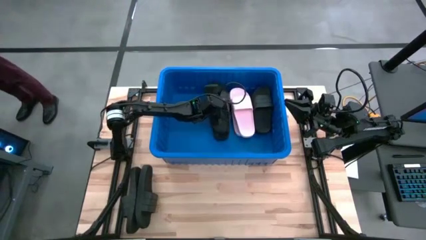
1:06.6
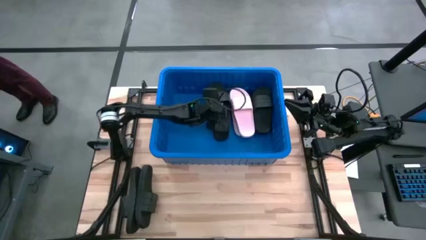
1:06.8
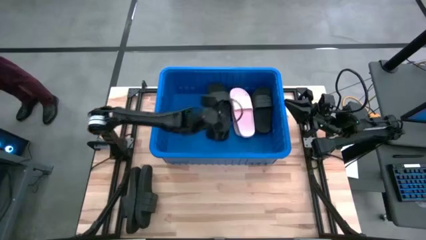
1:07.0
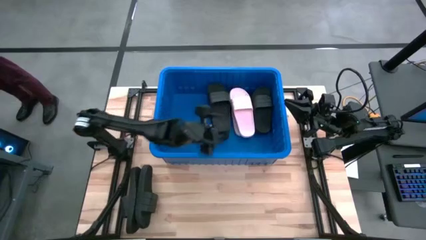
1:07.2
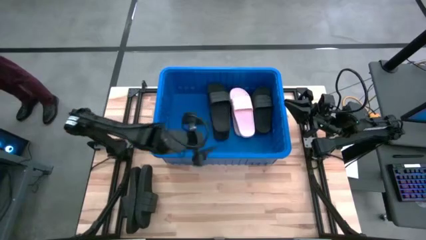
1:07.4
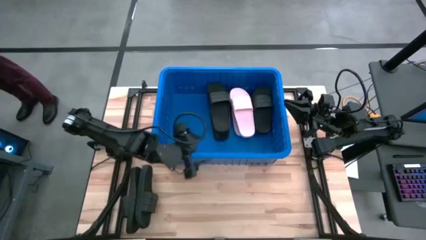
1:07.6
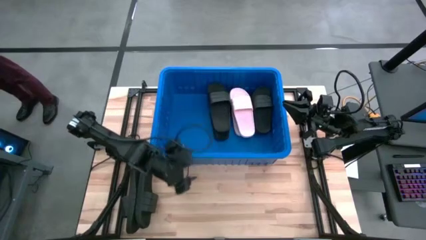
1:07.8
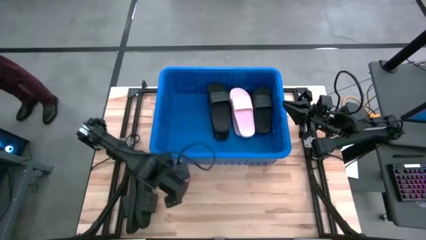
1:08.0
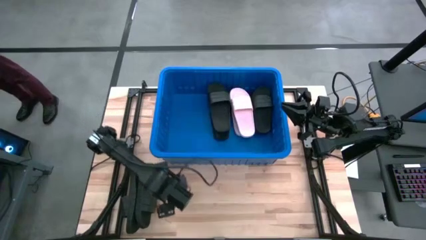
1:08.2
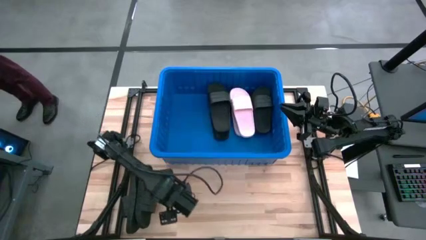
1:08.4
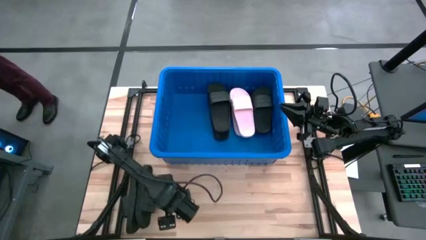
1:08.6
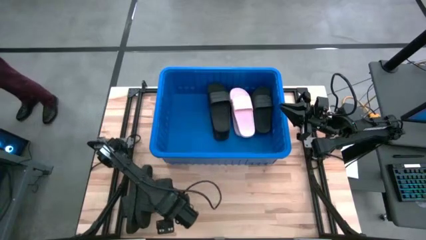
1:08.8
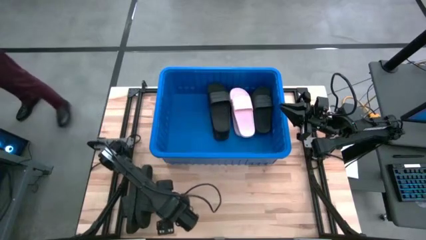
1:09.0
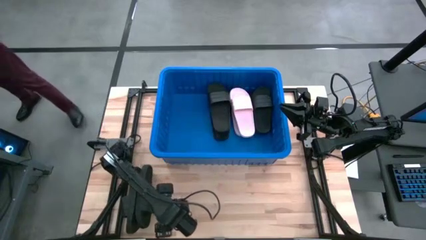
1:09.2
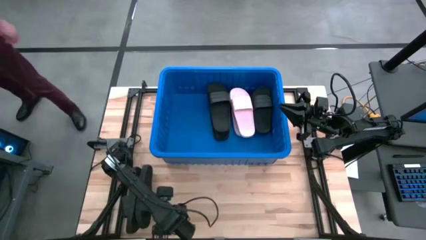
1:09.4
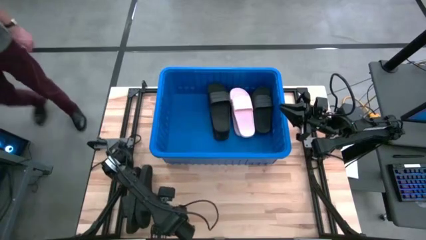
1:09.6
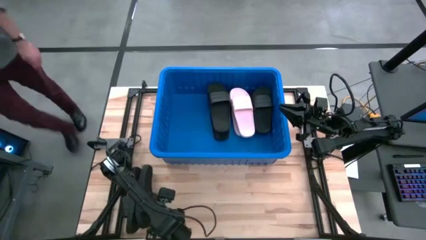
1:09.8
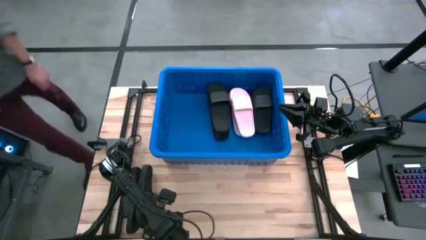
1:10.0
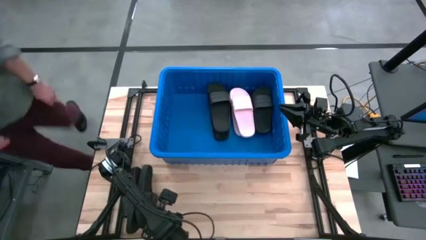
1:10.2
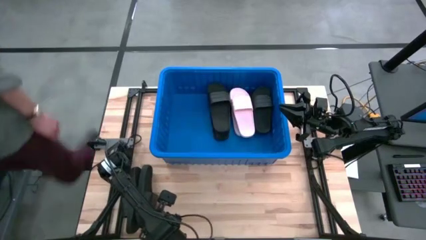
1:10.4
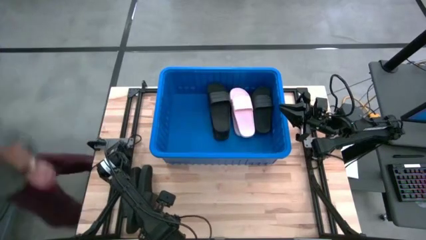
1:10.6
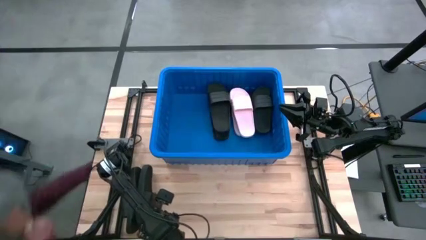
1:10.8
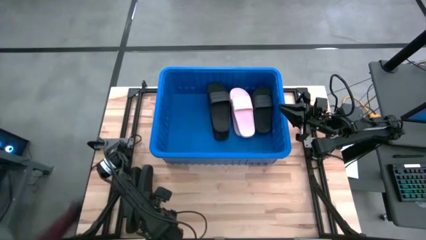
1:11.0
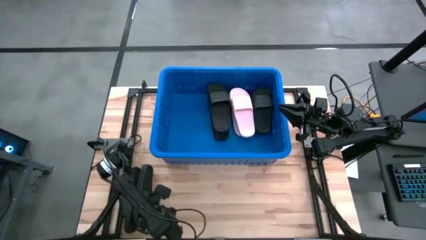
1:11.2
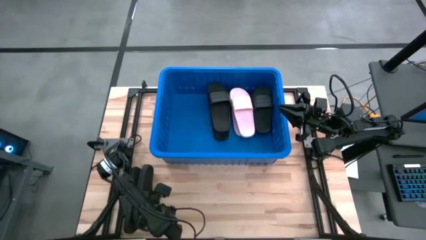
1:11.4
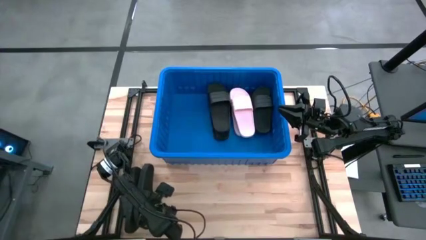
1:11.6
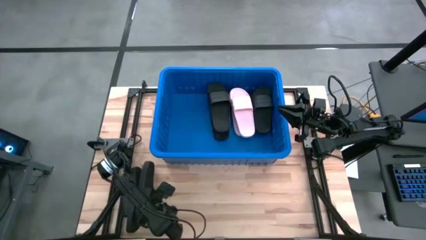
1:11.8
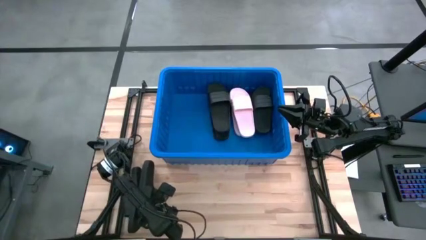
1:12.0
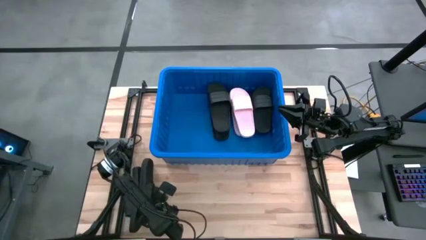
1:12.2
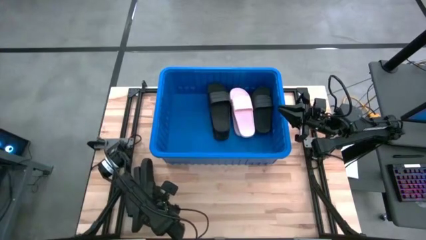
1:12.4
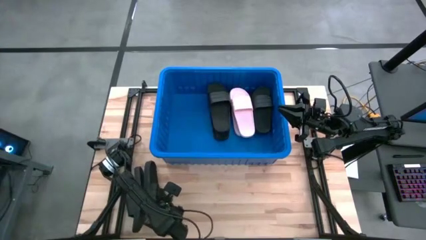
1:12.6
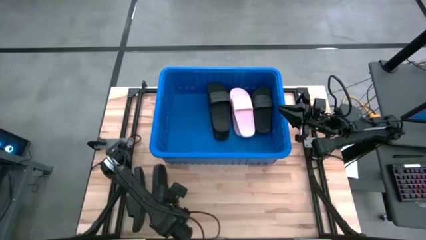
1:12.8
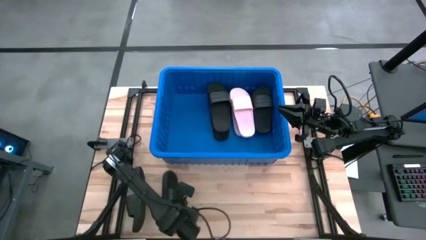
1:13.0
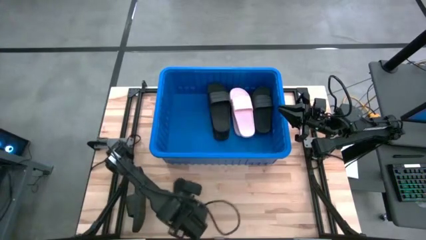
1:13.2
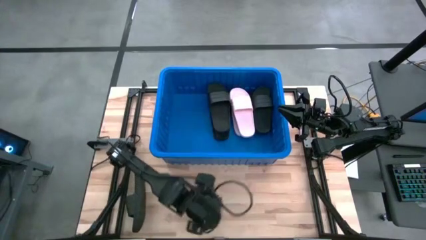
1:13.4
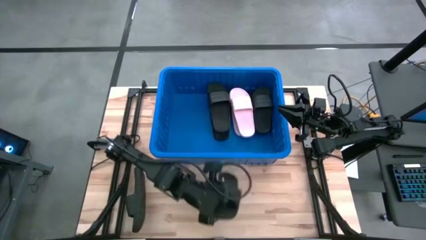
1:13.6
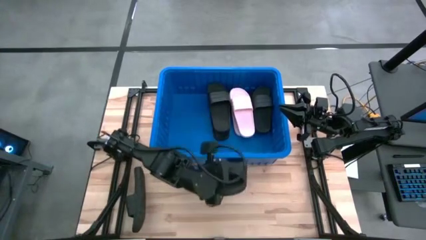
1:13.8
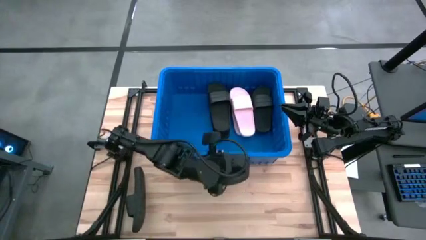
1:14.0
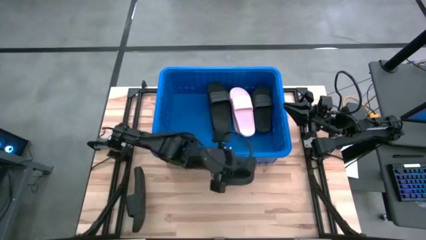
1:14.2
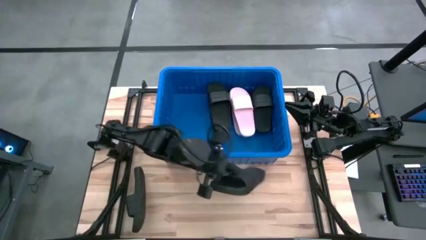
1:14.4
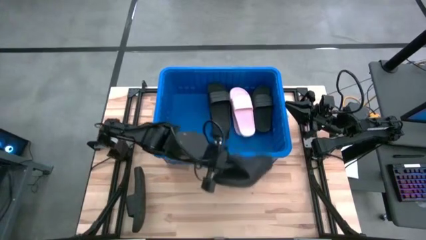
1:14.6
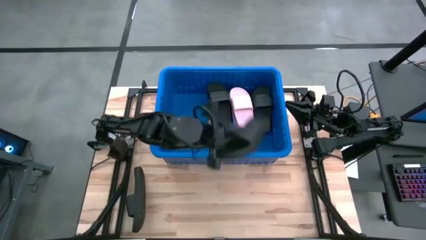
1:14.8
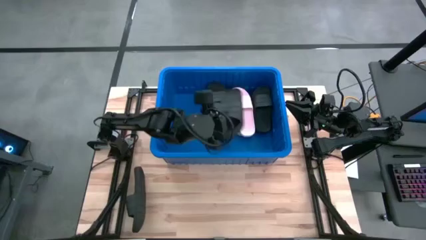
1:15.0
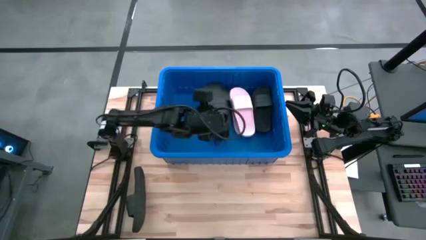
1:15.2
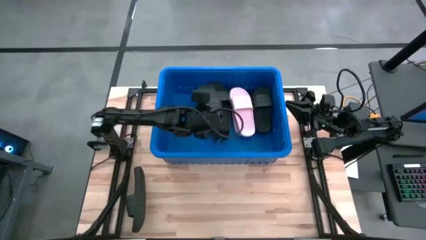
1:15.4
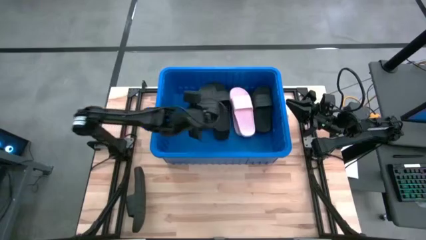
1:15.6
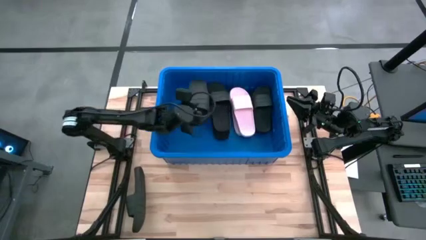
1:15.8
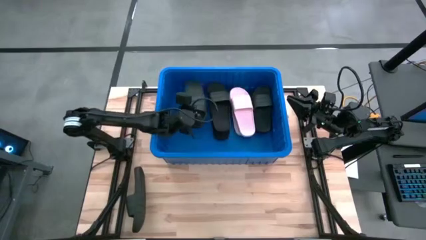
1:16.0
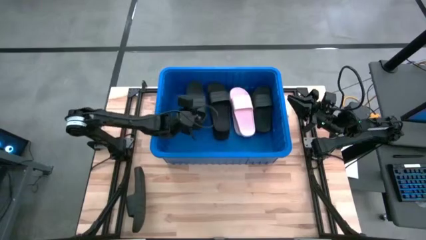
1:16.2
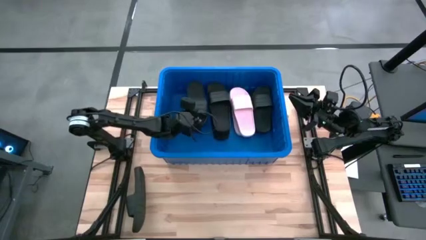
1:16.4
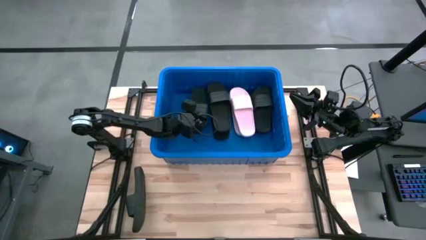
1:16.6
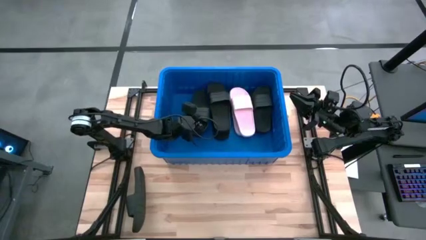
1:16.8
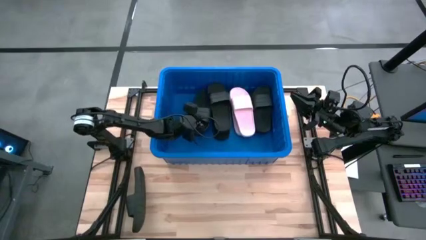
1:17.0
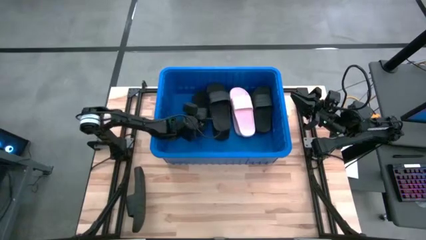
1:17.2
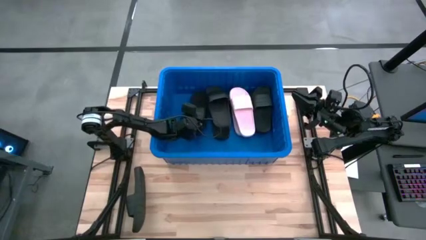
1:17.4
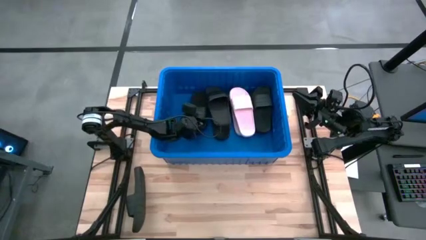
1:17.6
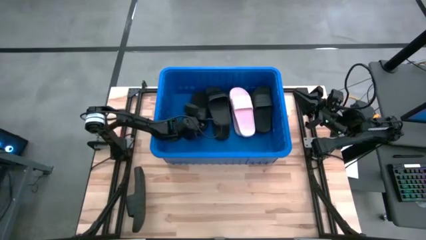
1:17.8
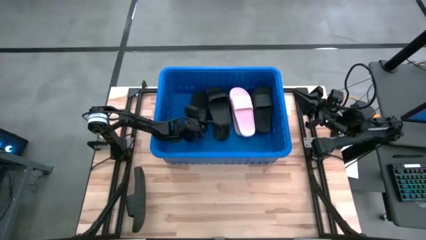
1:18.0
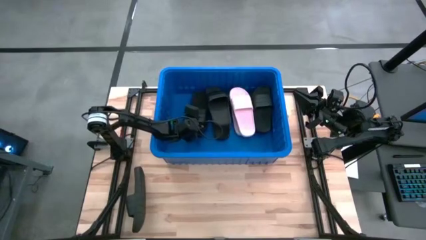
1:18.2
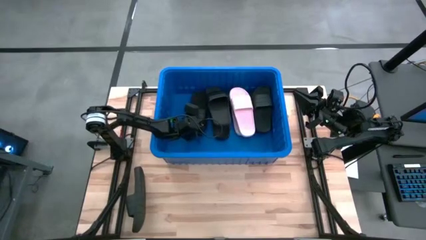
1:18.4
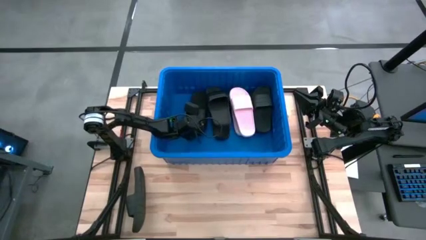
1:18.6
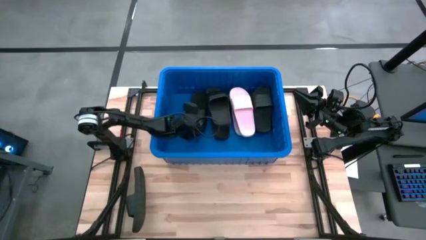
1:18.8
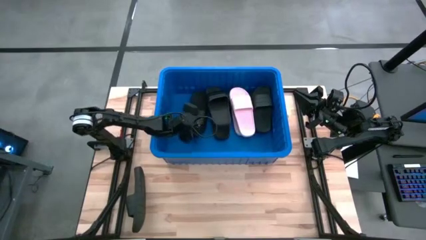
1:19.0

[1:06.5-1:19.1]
Task: Pick and place slides into bin
Put the black slide into the blue container
